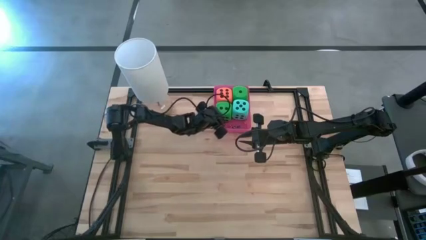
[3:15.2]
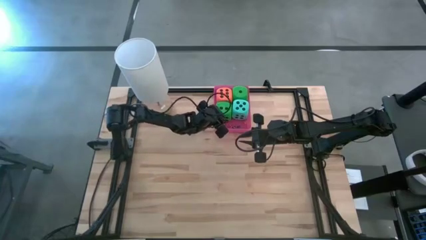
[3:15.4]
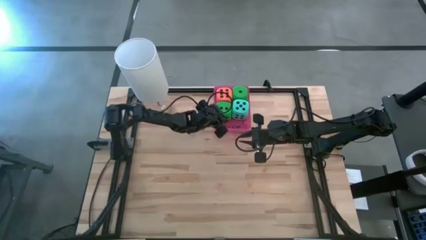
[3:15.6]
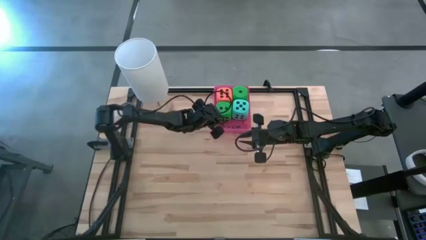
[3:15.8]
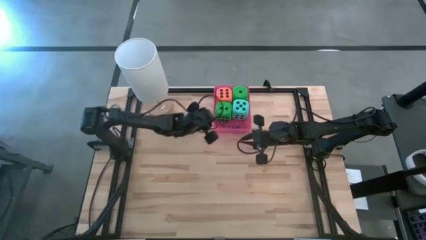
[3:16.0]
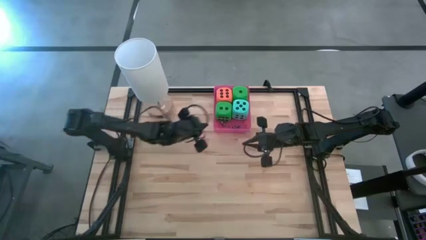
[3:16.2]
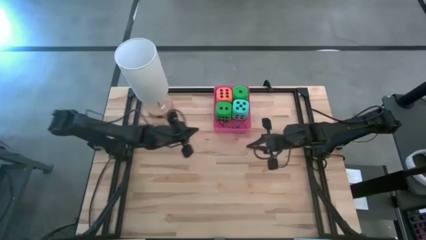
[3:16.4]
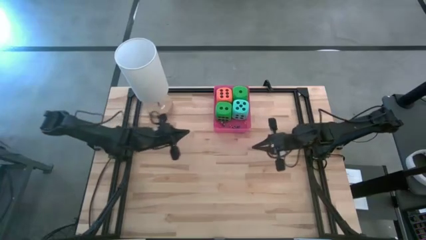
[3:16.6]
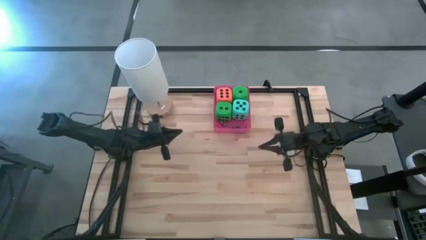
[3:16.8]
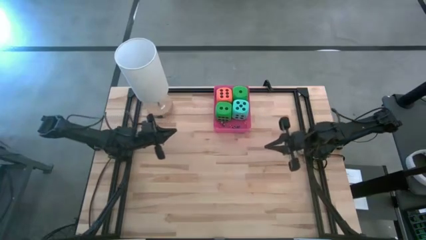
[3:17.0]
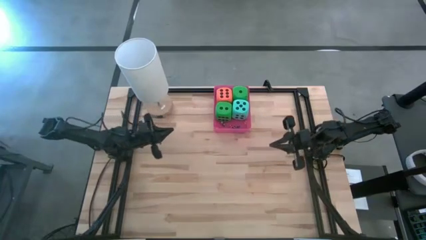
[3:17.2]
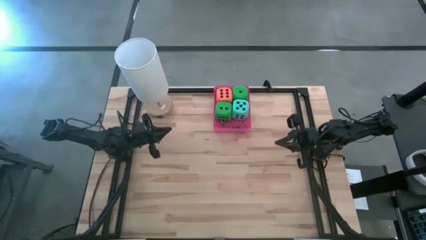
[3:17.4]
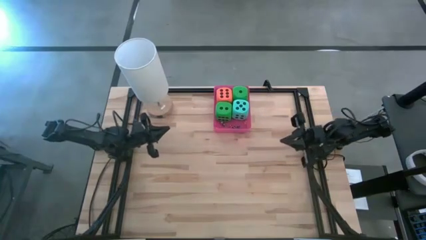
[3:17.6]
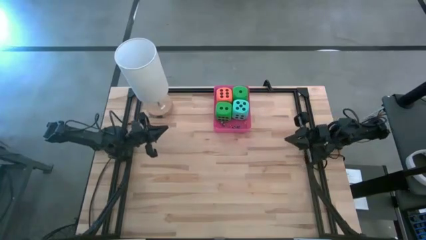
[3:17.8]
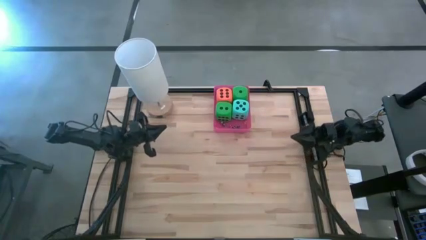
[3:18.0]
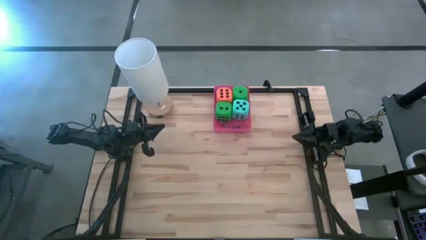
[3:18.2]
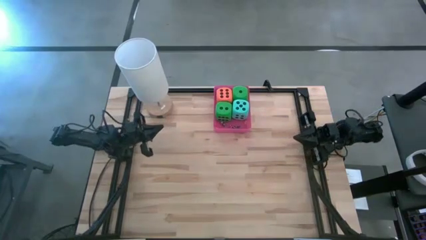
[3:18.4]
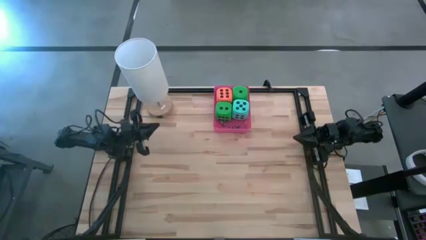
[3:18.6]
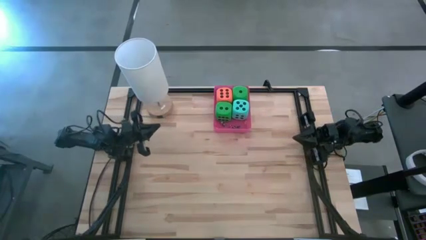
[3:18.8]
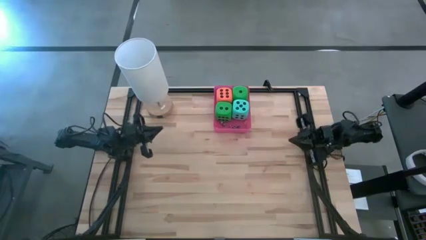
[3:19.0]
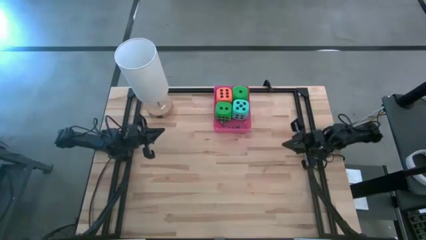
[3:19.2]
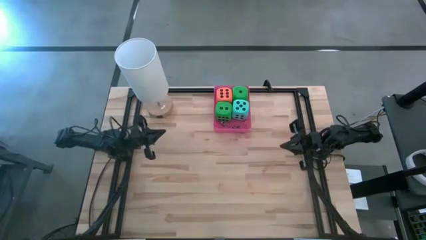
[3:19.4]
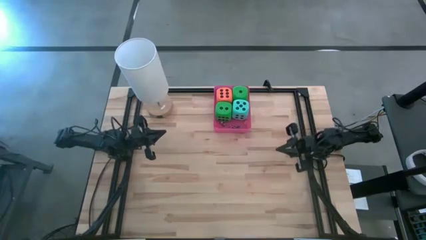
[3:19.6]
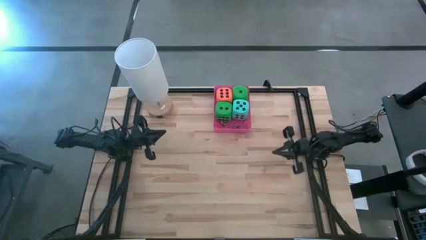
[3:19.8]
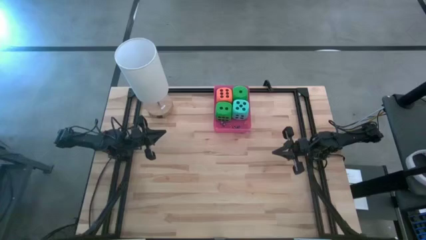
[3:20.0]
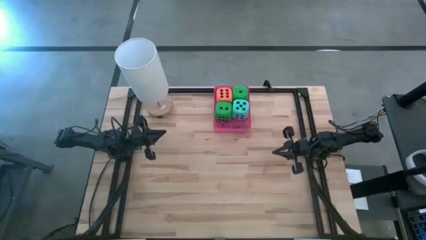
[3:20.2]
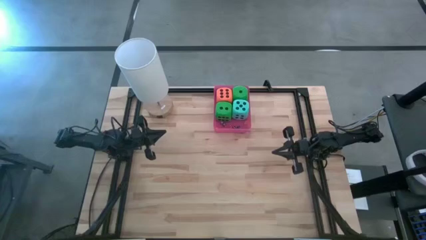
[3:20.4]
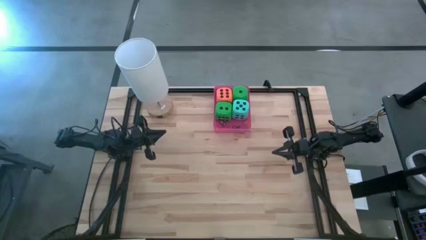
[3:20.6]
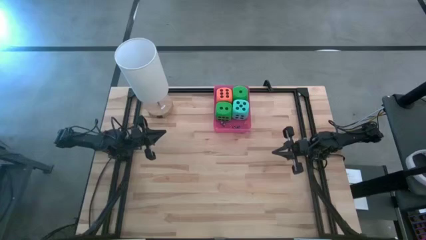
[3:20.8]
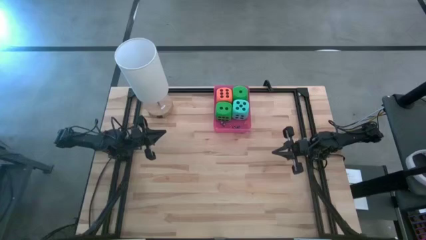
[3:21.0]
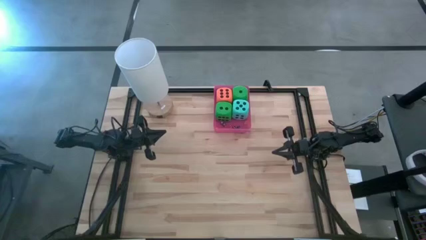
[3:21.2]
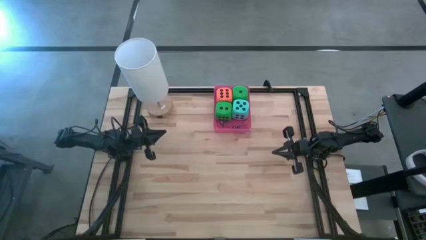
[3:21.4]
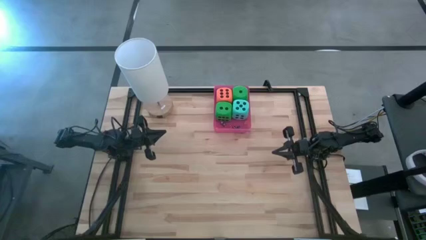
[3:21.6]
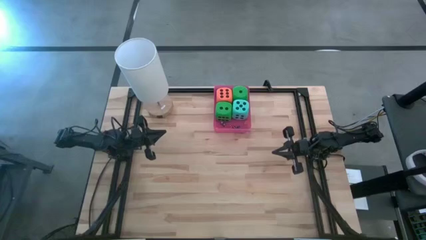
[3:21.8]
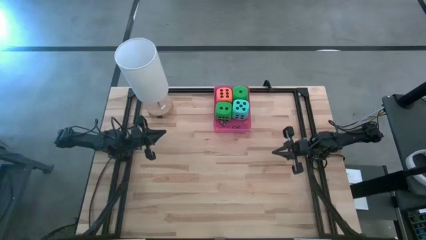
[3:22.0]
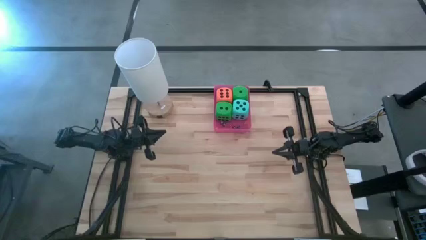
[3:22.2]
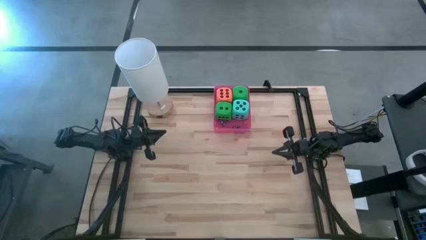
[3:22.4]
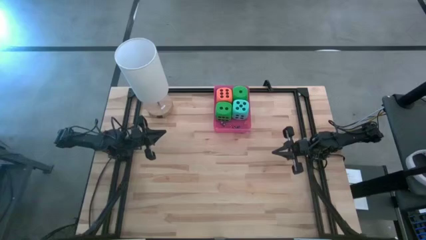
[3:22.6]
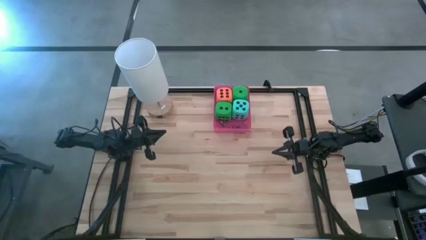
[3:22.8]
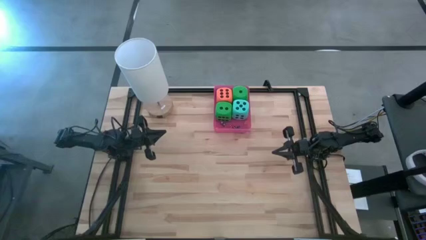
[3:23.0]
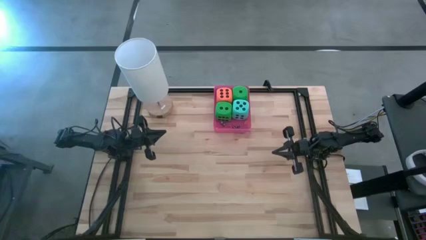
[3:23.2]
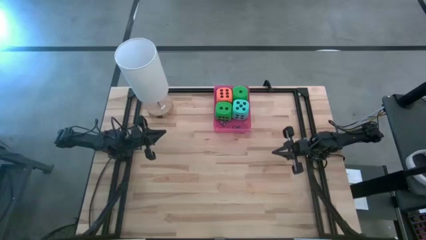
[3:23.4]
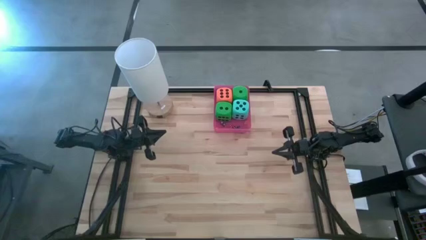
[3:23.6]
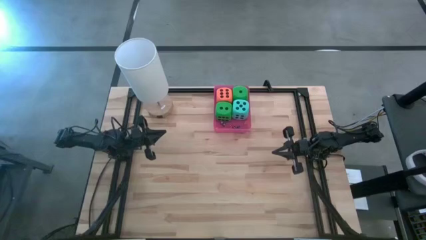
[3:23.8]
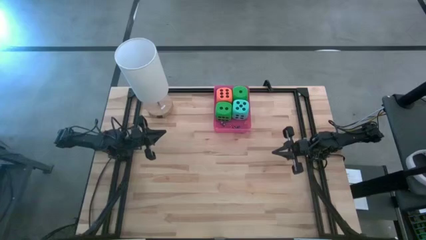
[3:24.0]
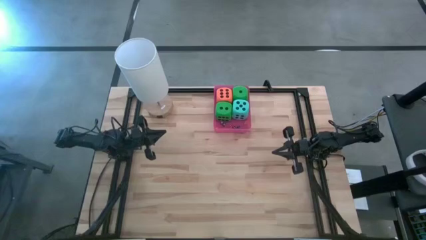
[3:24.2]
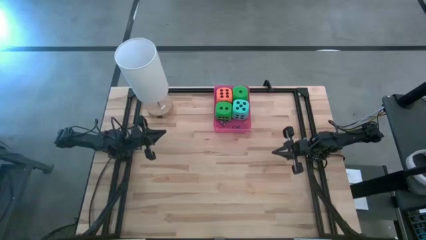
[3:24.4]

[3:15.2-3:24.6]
Task: Pick & Place Dice
Return to Home Position

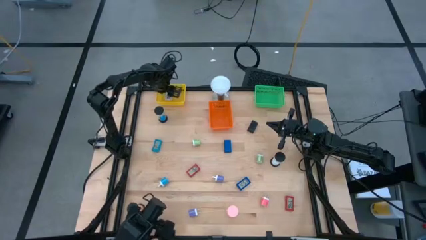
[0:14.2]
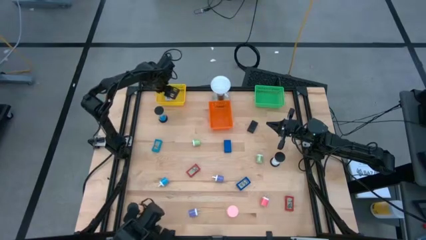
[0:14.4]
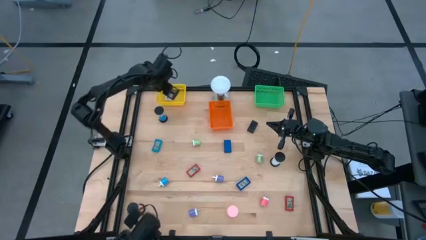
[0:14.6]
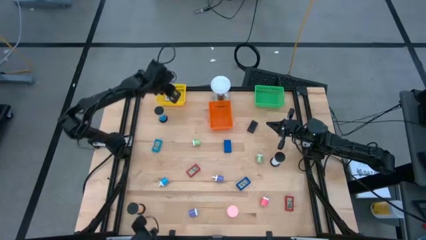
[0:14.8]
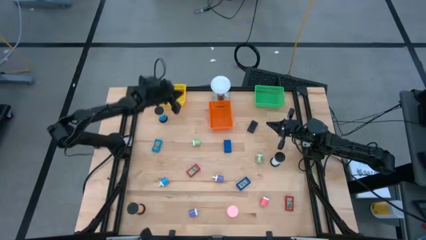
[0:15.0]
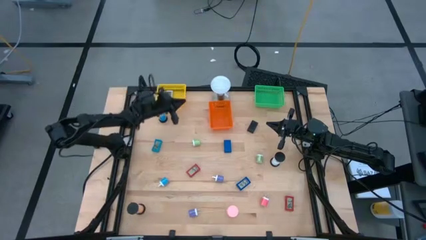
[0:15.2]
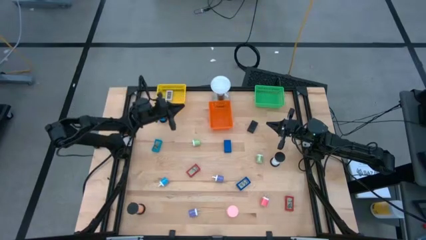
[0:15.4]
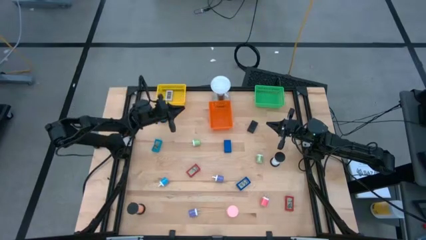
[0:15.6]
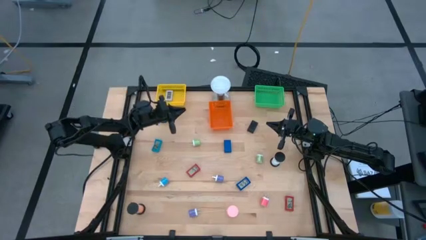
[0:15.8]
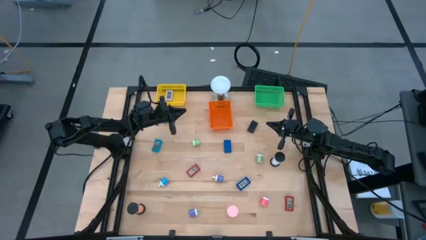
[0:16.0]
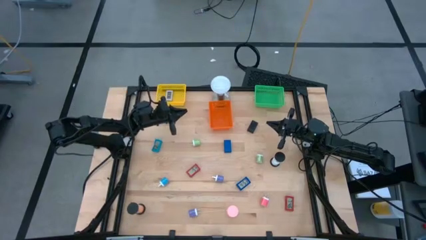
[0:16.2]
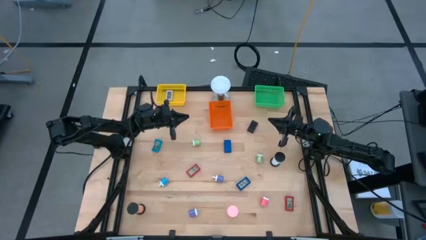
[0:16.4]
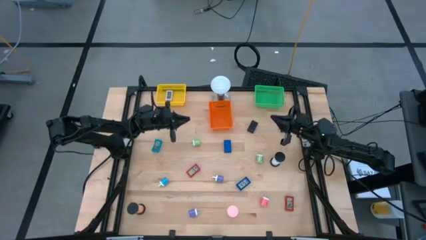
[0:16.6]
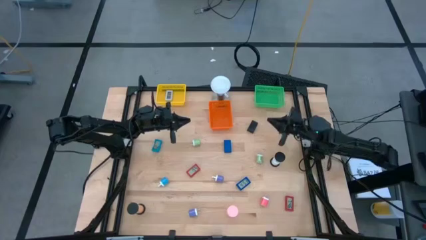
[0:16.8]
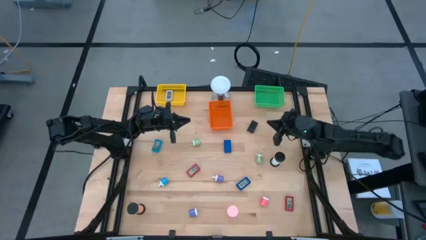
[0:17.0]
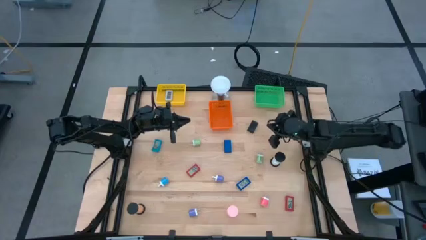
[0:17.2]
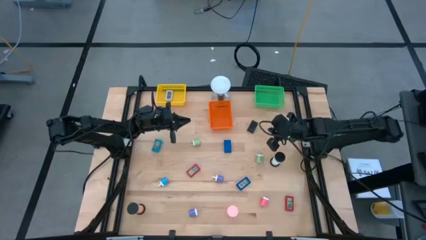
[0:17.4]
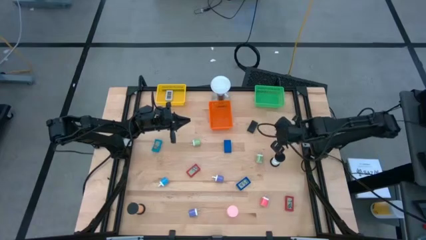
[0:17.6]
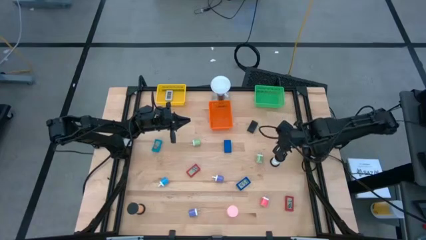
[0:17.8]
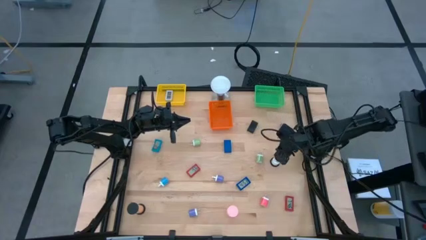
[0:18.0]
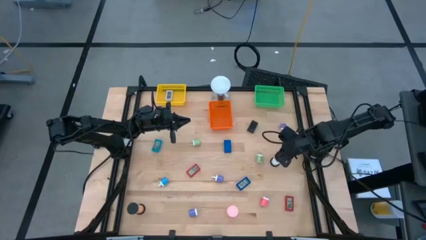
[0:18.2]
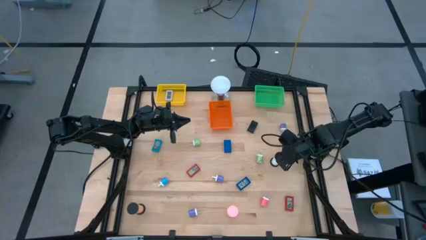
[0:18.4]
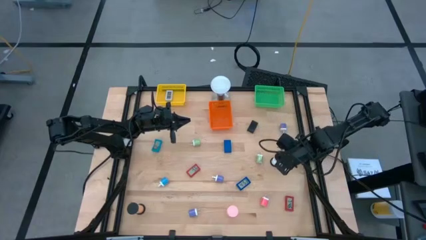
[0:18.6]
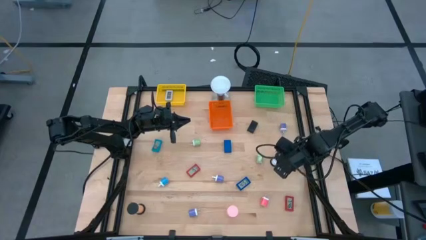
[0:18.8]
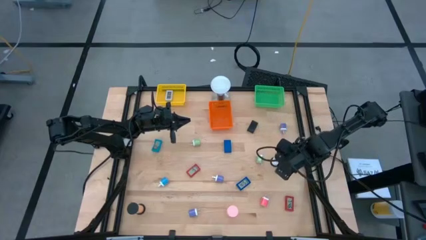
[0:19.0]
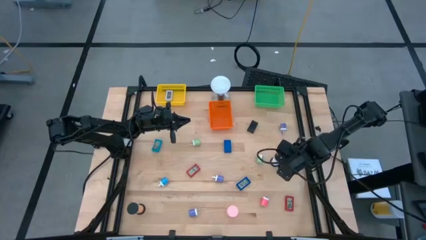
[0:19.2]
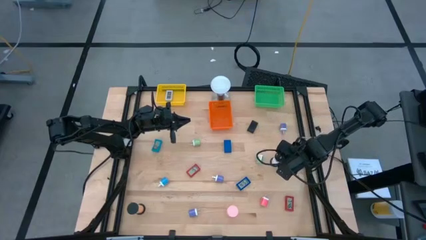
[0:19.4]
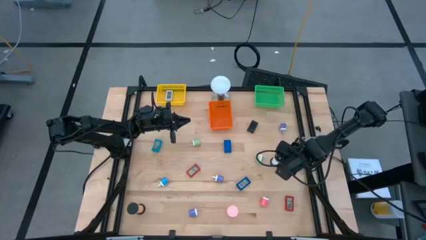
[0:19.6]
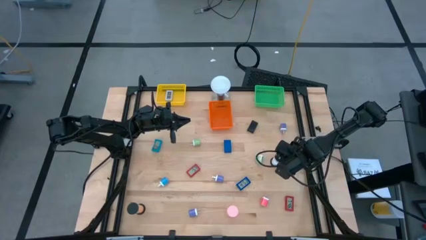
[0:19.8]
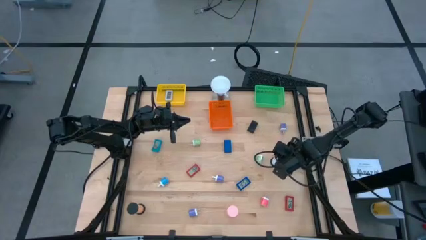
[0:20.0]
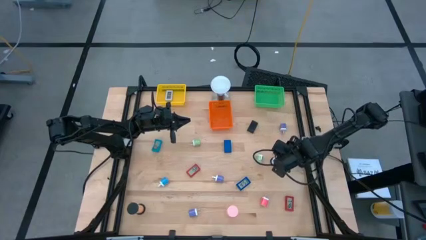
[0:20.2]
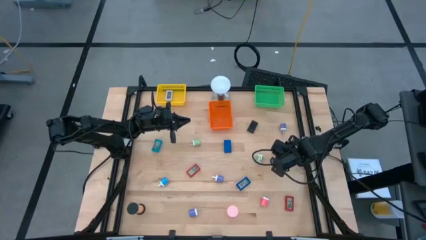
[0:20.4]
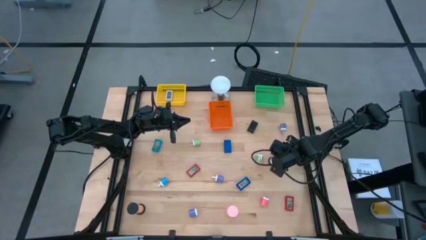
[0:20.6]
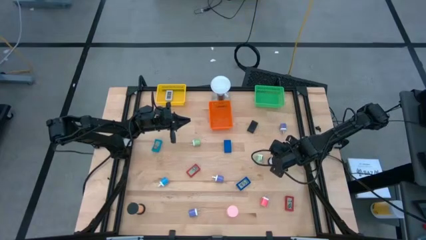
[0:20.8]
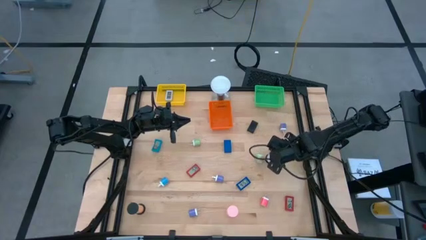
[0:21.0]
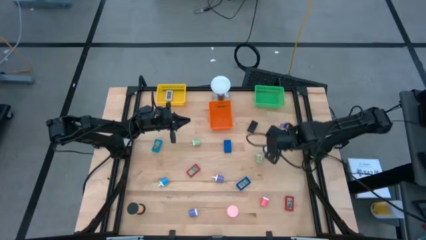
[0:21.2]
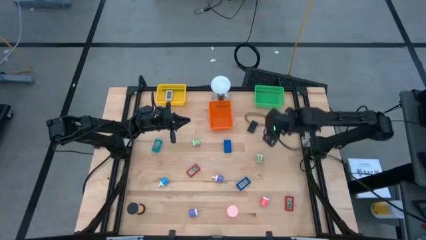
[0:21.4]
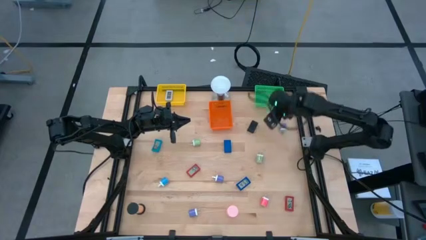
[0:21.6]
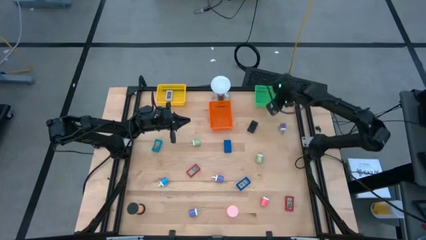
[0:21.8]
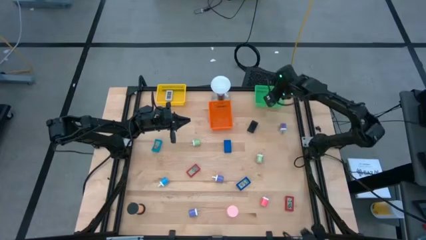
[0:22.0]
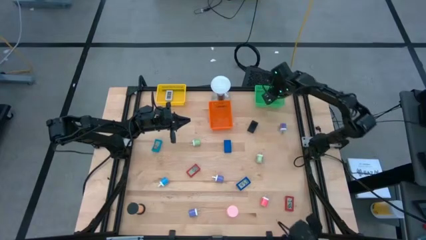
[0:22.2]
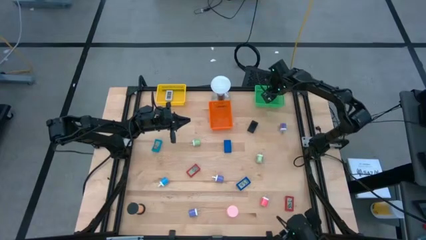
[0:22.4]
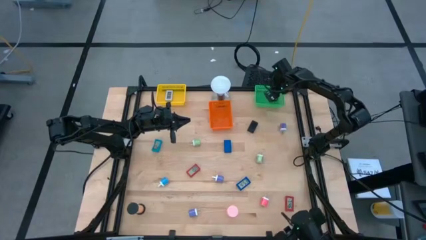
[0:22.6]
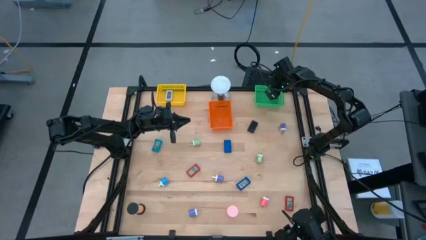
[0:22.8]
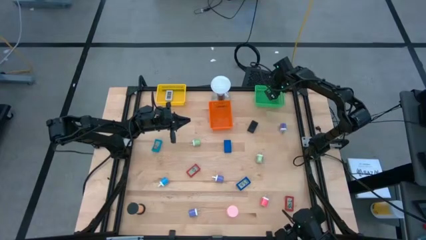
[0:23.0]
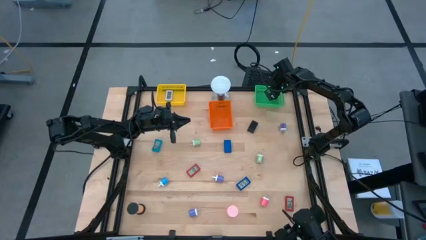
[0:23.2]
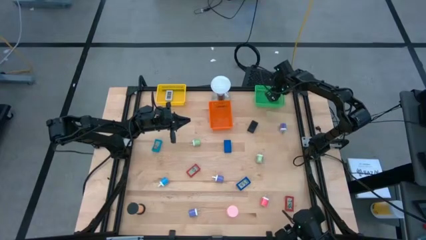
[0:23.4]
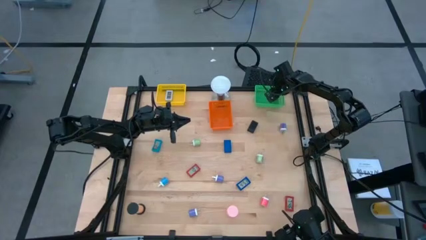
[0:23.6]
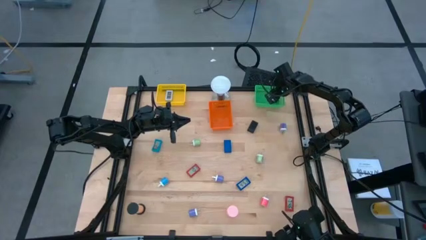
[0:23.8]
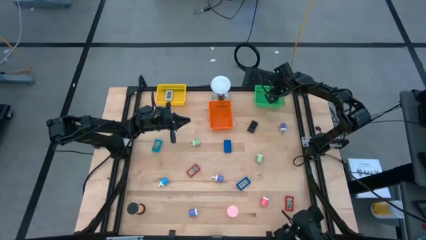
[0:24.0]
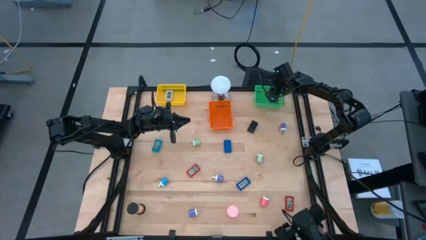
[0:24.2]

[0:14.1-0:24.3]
Task: Pick & Place Office items
Put the white sandglass timer into the green bin
